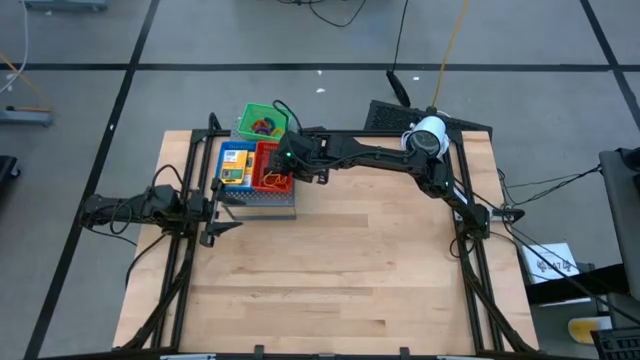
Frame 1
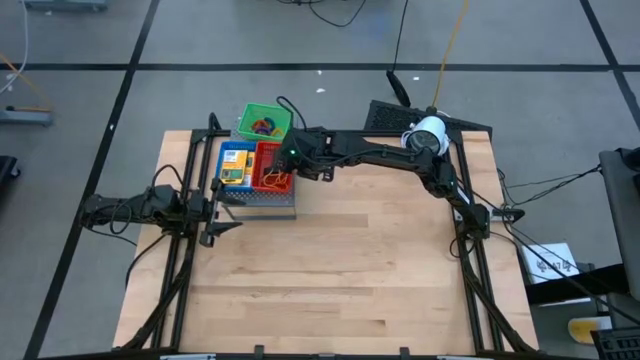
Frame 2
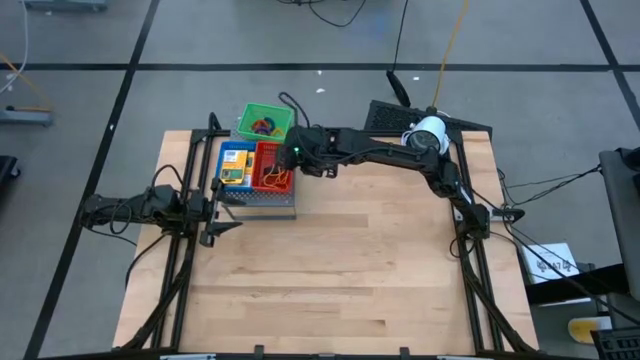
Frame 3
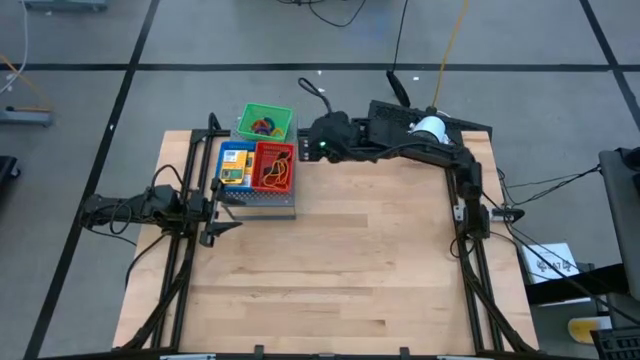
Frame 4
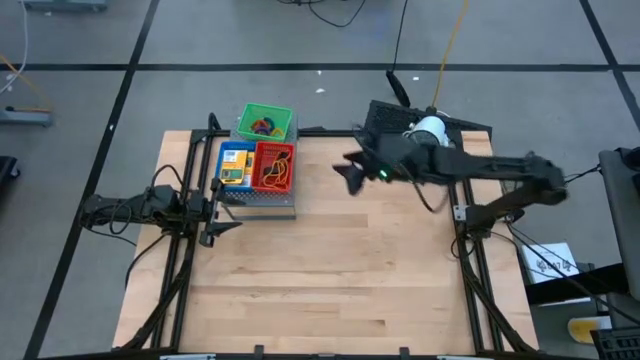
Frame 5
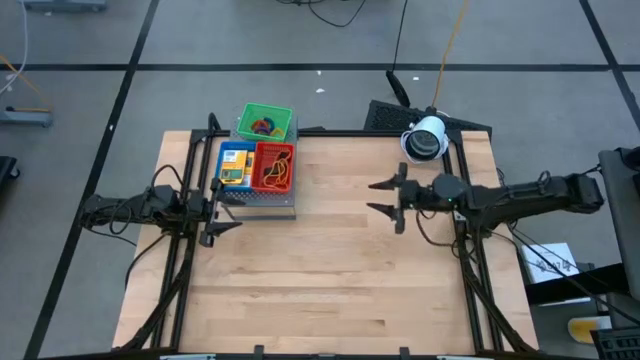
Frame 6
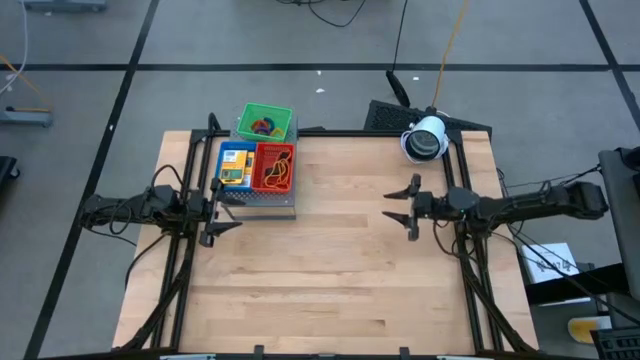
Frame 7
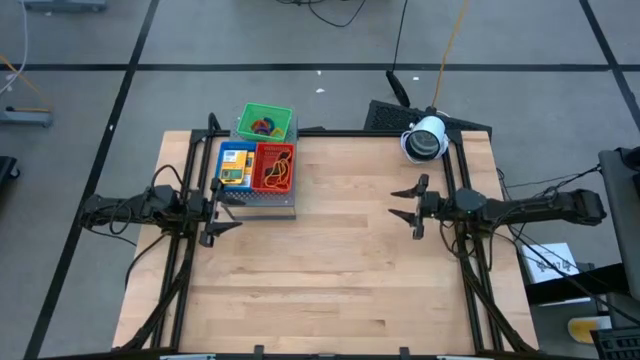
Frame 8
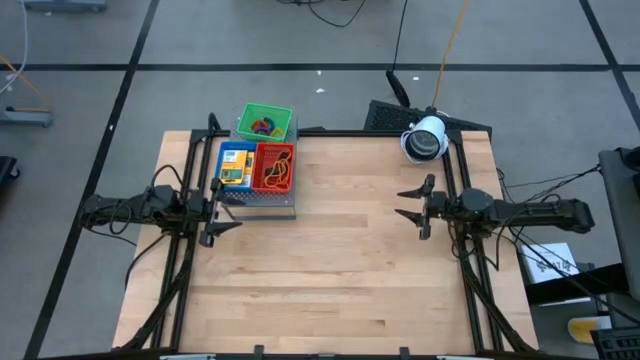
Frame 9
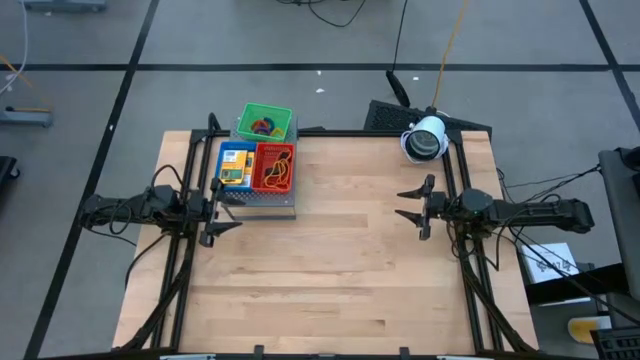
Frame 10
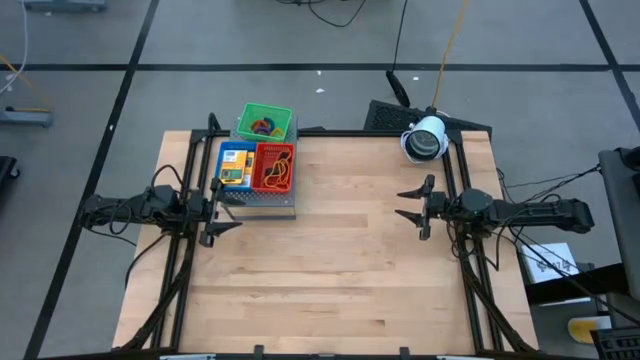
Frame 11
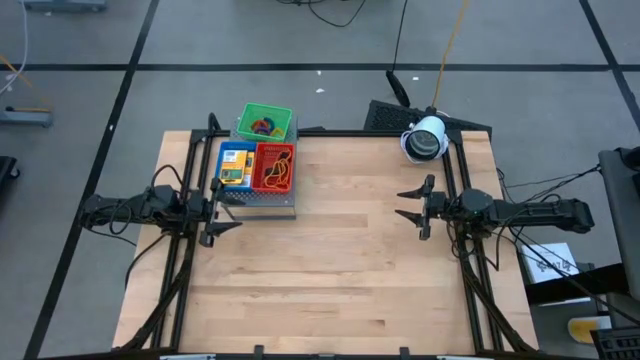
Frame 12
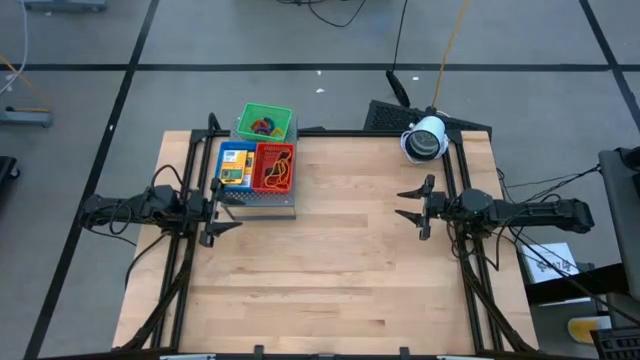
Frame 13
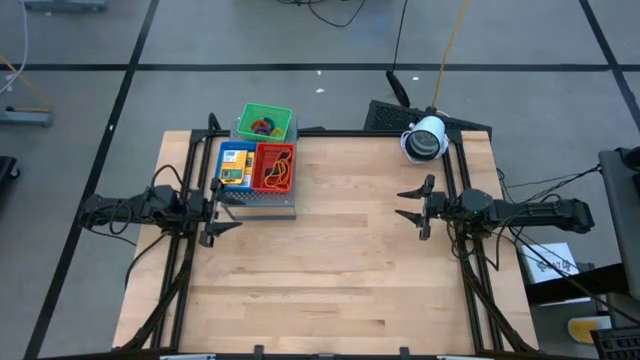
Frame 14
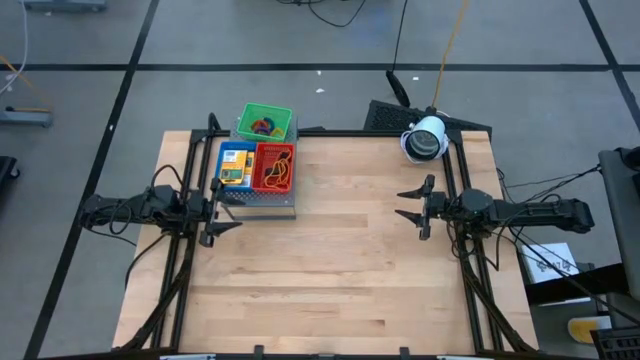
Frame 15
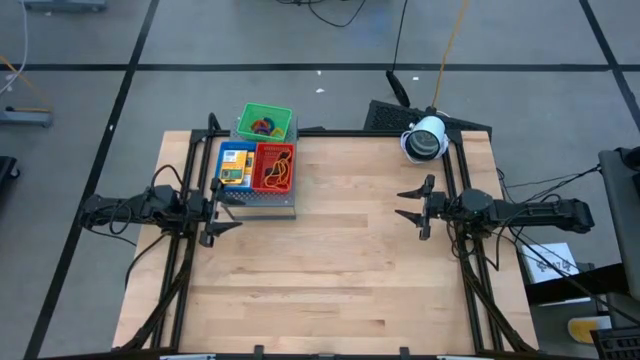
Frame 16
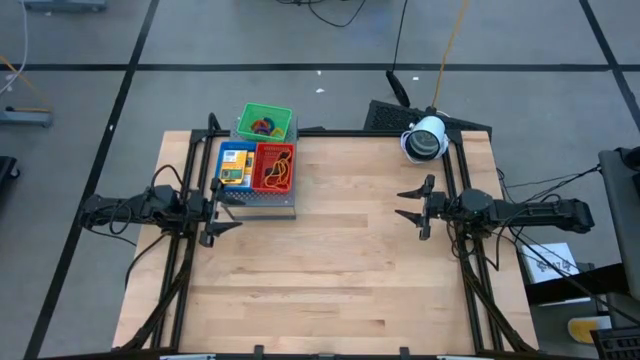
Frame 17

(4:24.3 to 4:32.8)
Task: Pick & Place Office Desk Supplies
Return to Home Position

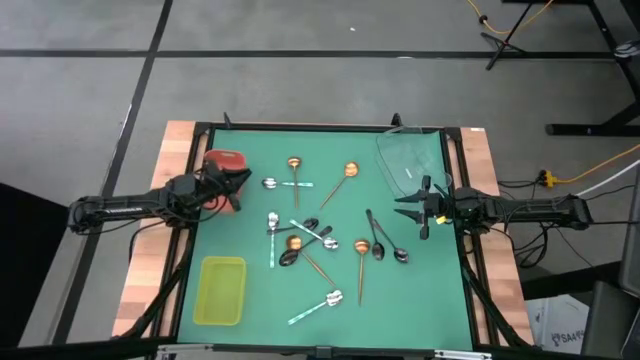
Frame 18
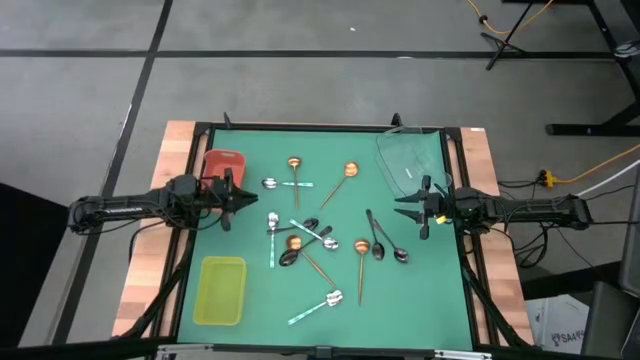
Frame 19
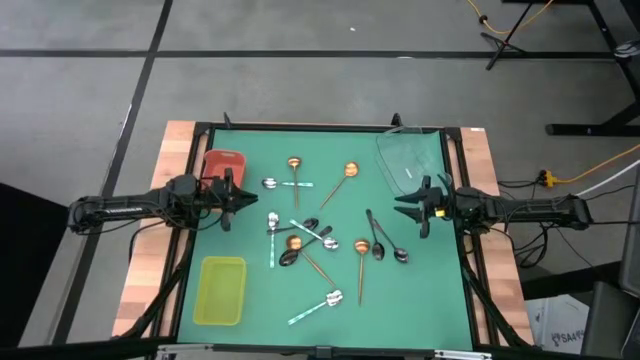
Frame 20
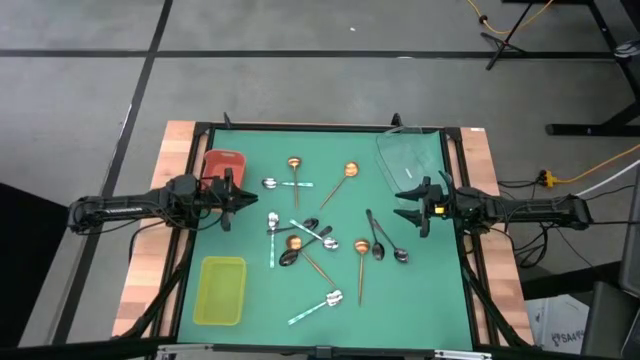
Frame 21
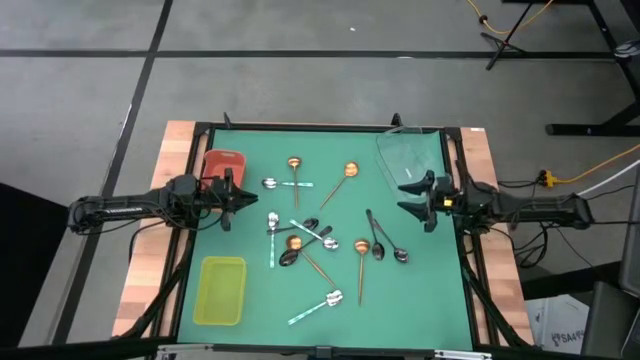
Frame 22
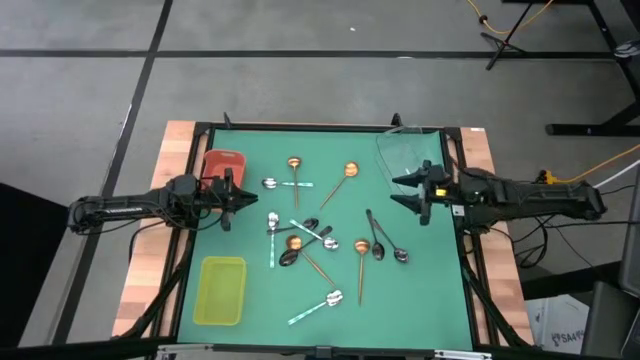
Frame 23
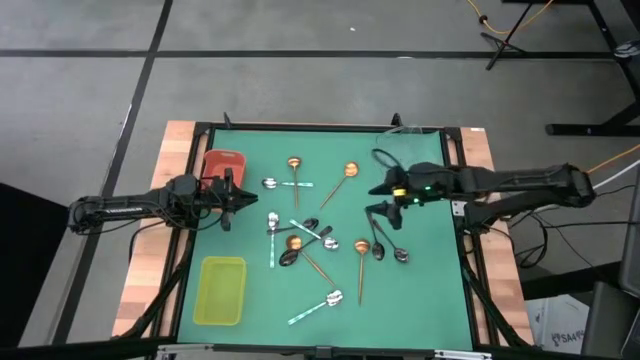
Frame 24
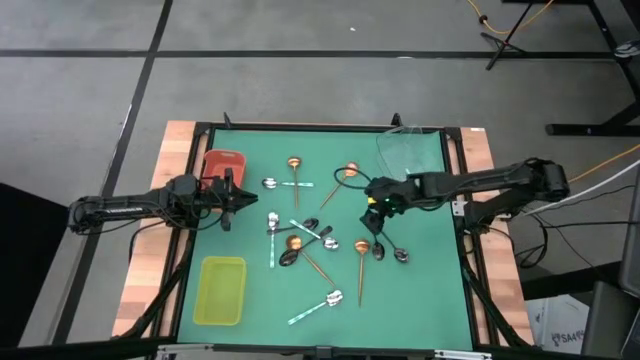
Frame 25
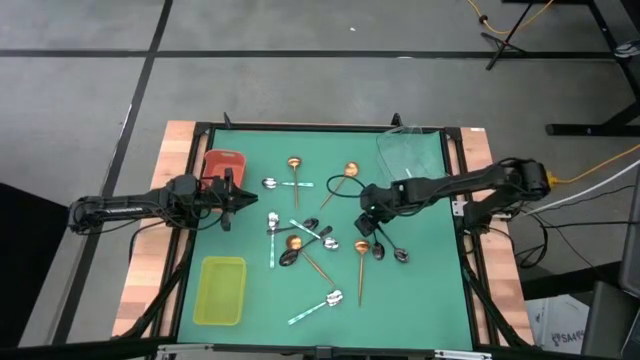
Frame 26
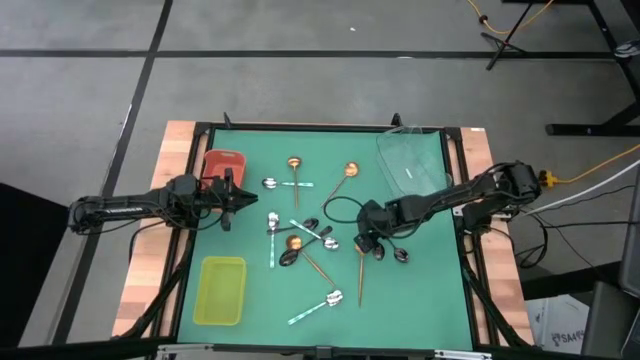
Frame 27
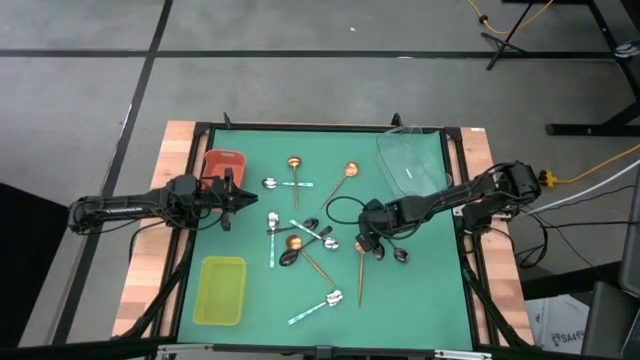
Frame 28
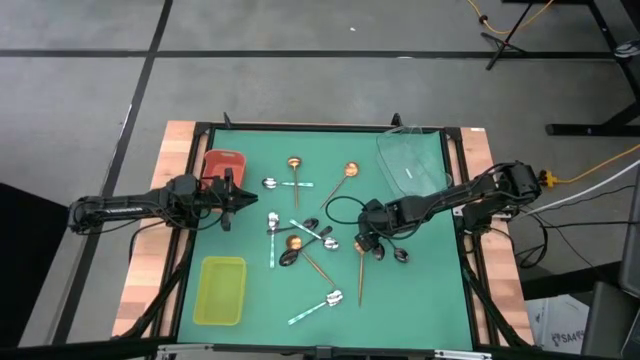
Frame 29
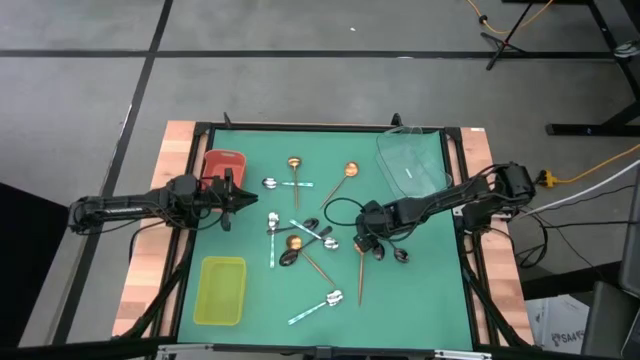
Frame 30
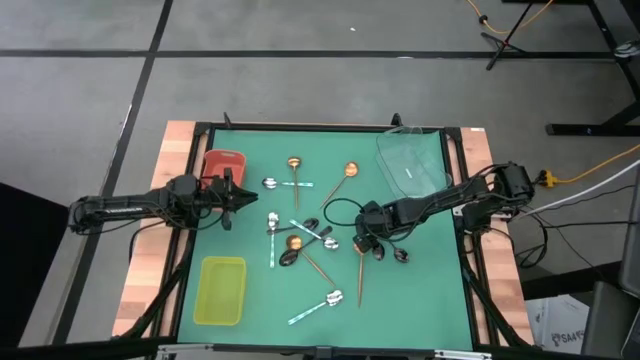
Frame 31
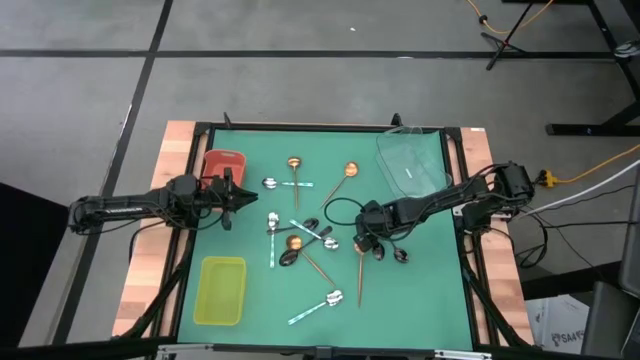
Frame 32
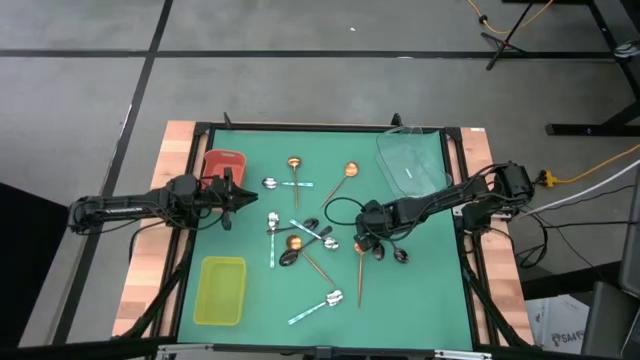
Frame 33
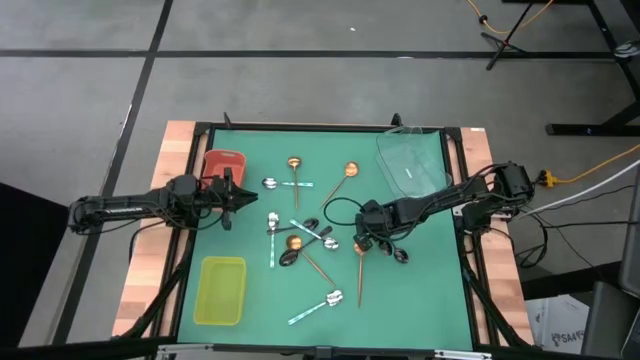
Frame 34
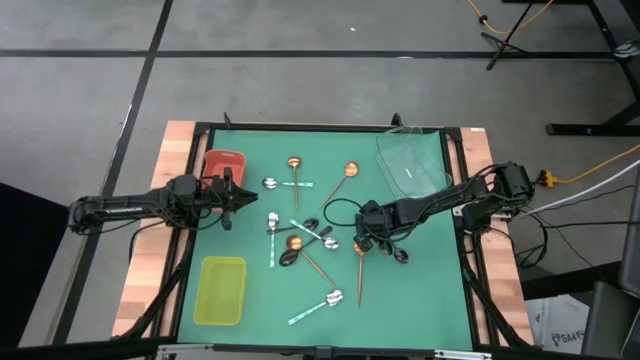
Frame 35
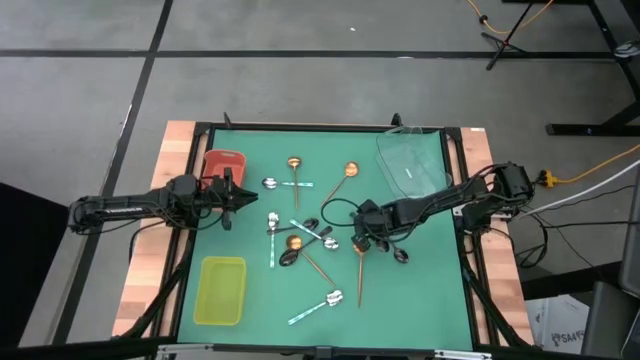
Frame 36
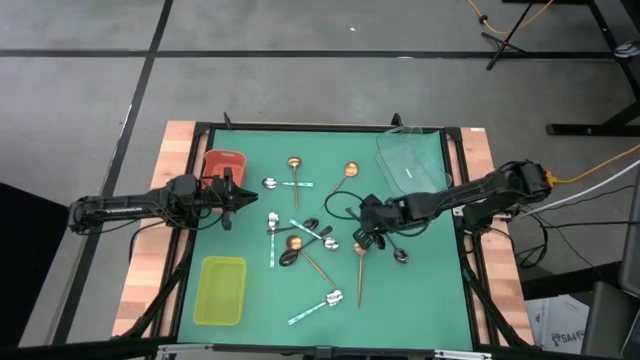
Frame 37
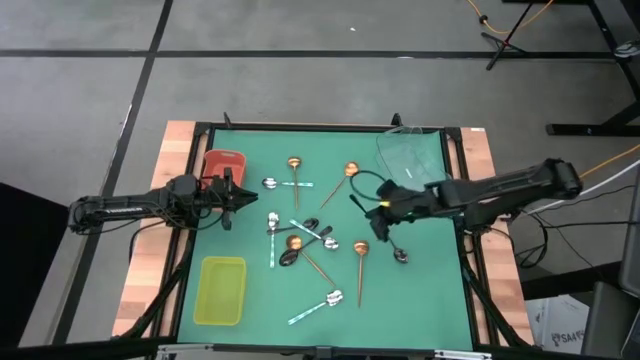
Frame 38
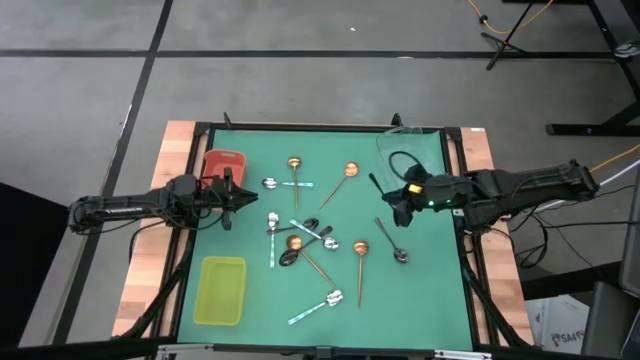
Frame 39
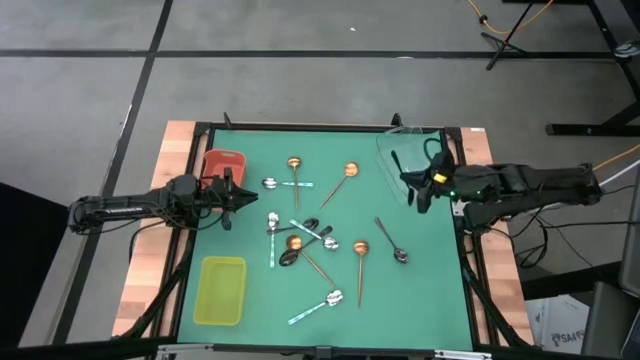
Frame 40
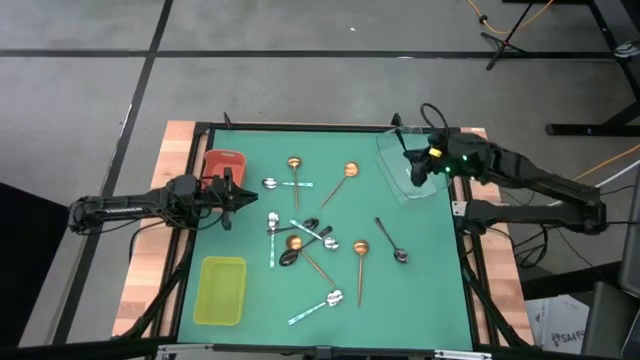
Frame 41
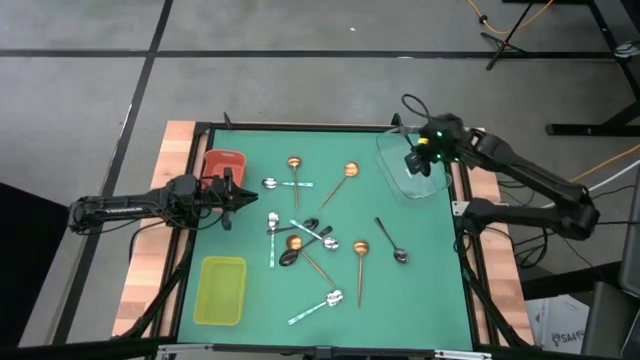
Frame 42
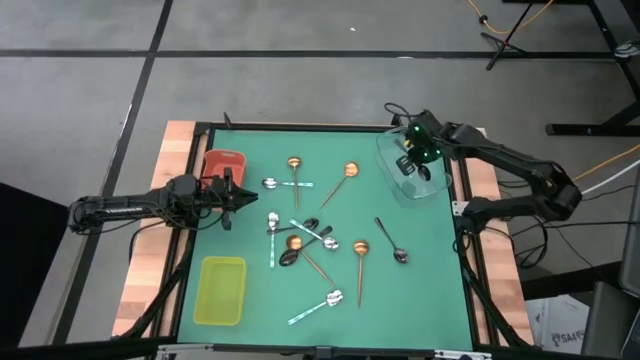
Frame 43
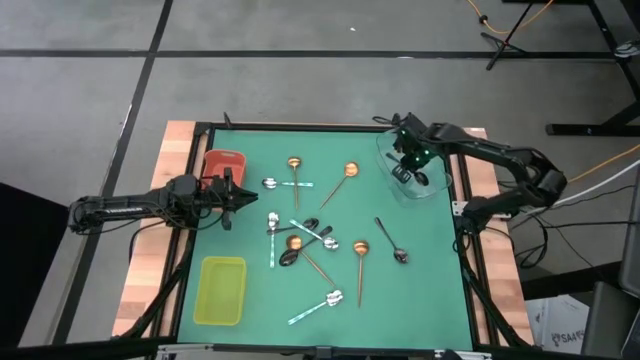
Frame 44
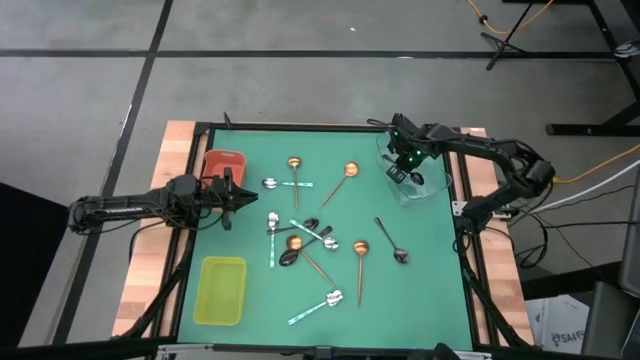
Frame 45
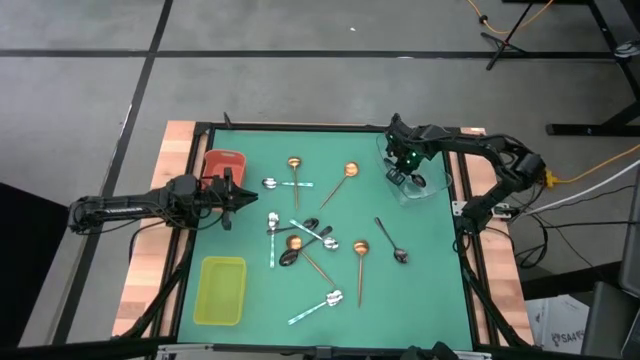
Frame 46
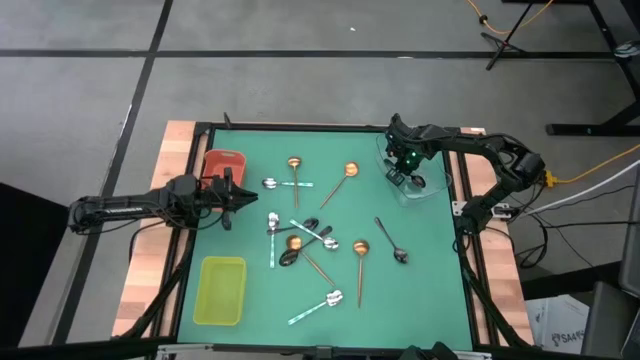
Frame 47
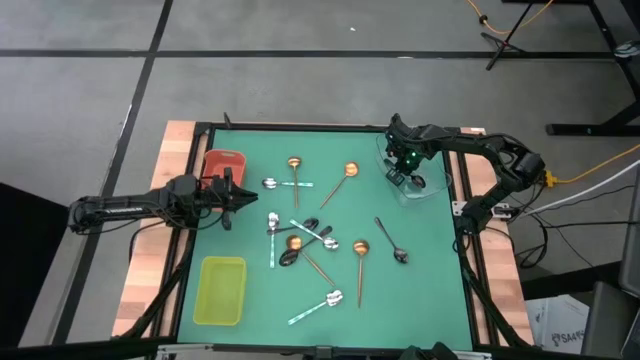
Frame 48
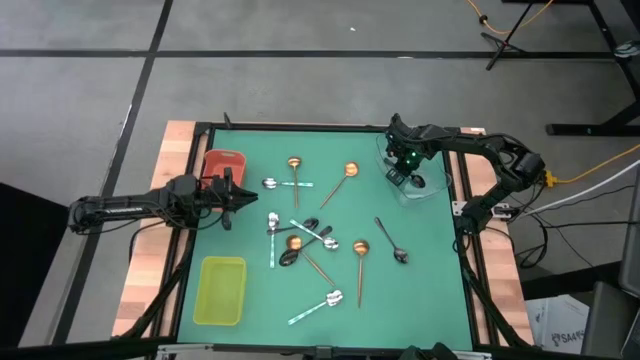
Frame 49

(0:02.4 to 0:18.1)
Task: Sort silverware by color (type)
Put the black spoon into the transparent bin
